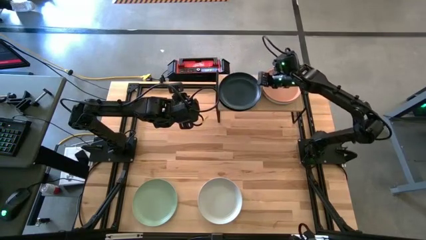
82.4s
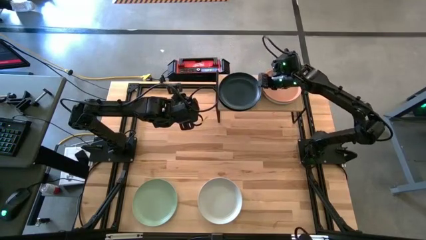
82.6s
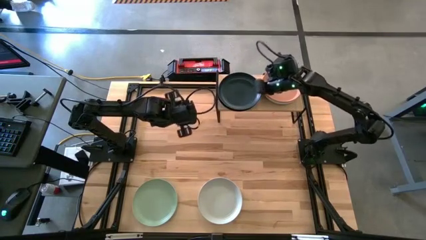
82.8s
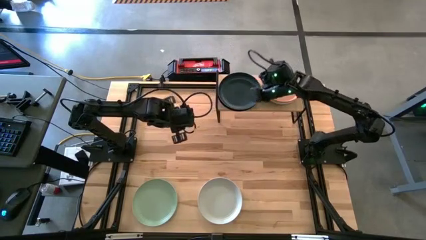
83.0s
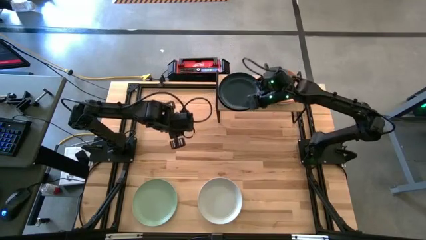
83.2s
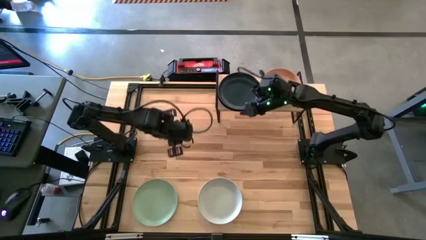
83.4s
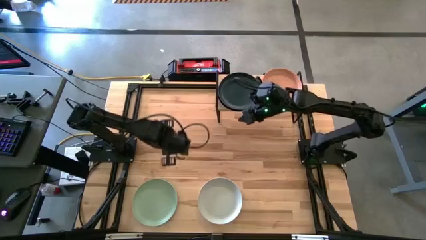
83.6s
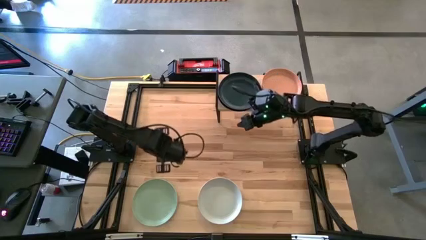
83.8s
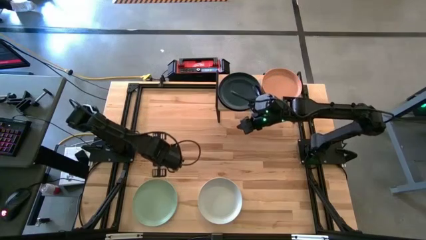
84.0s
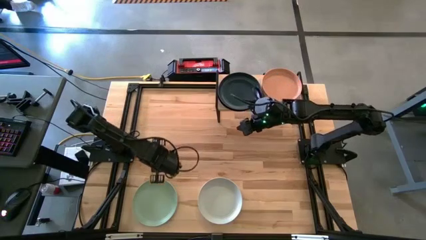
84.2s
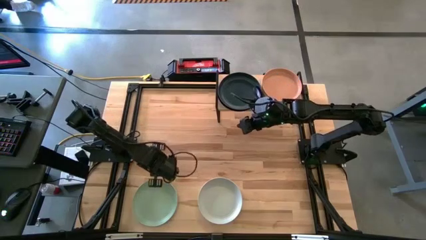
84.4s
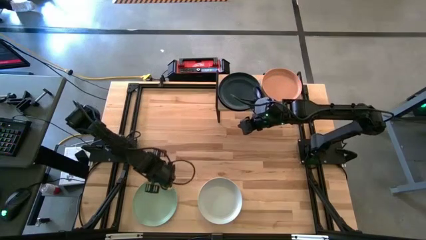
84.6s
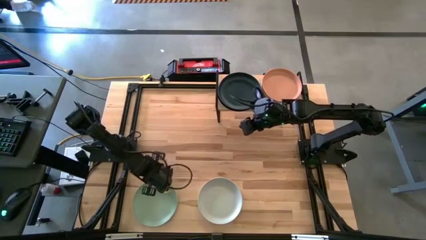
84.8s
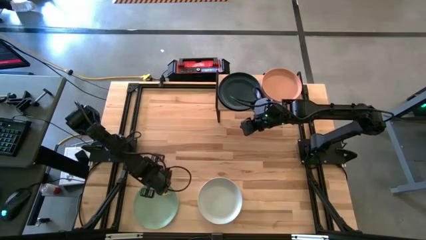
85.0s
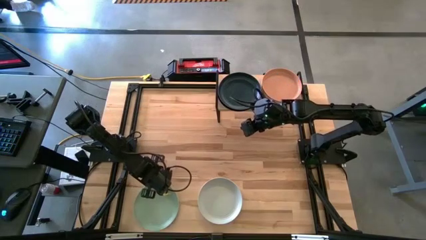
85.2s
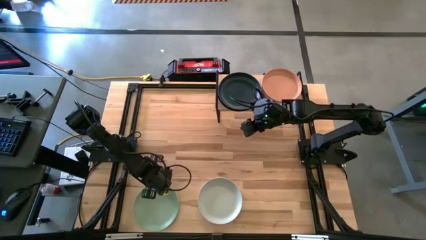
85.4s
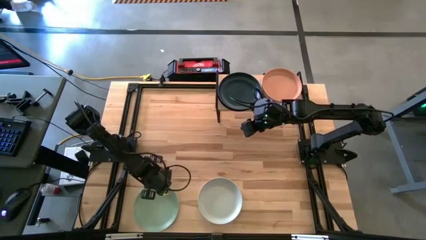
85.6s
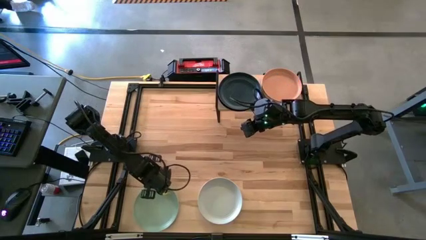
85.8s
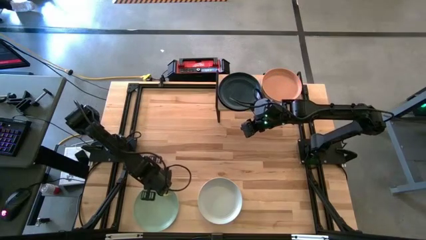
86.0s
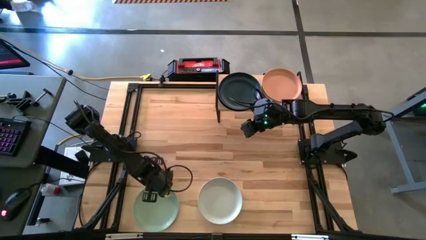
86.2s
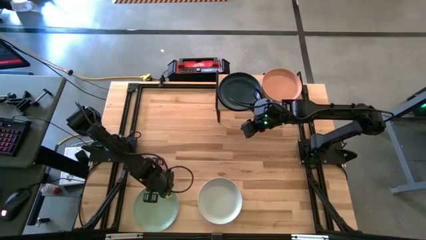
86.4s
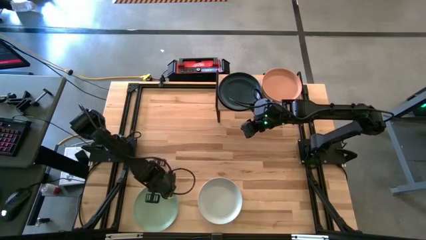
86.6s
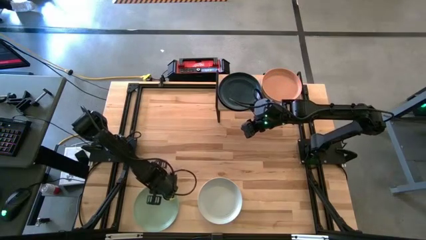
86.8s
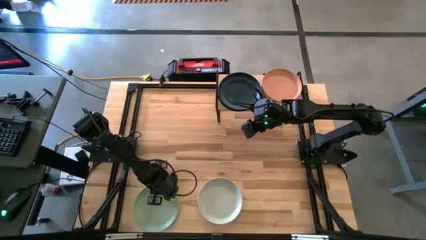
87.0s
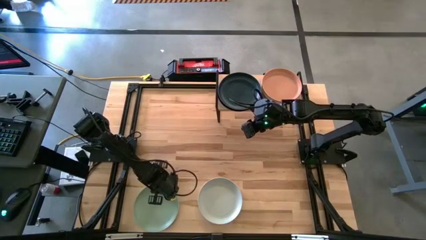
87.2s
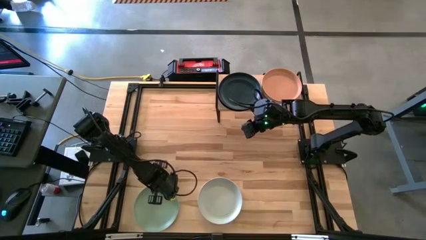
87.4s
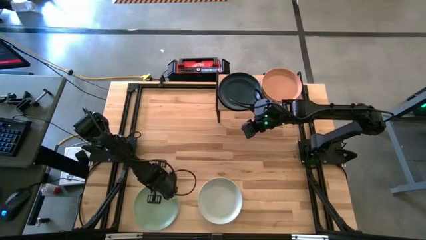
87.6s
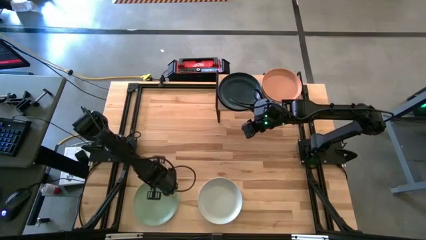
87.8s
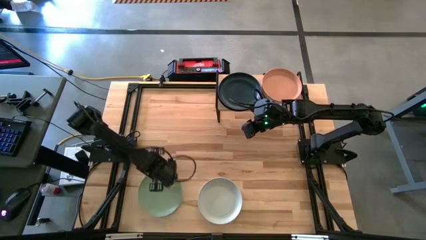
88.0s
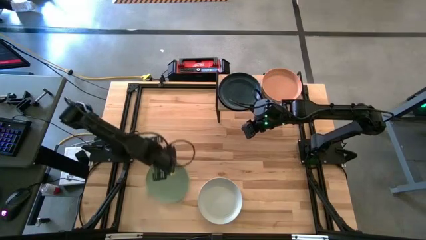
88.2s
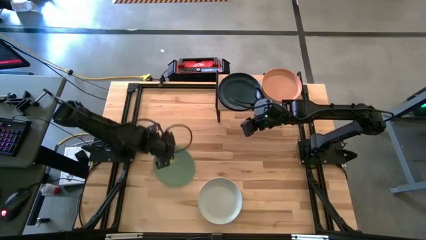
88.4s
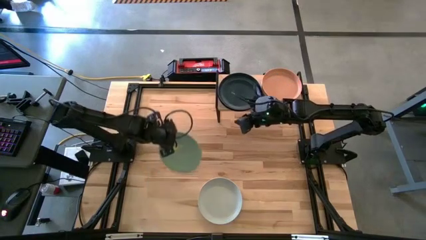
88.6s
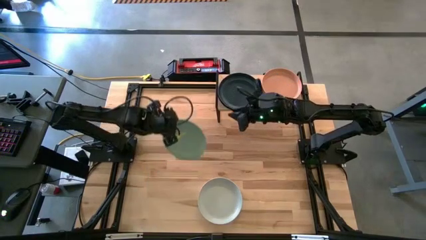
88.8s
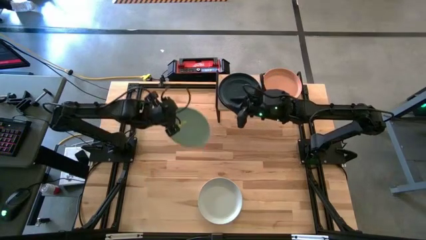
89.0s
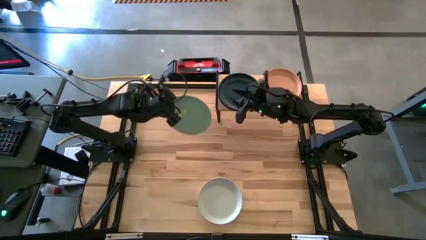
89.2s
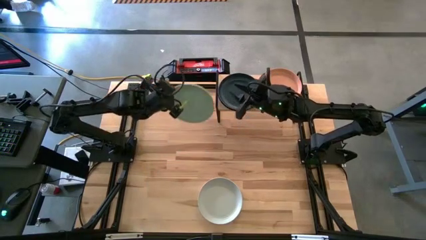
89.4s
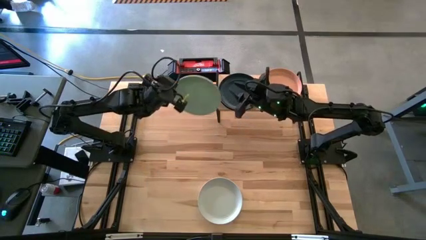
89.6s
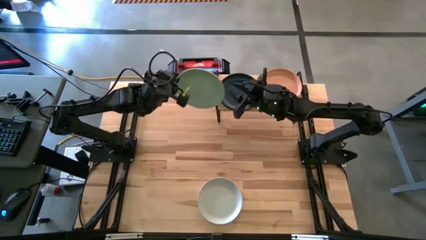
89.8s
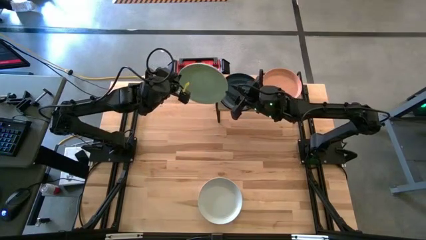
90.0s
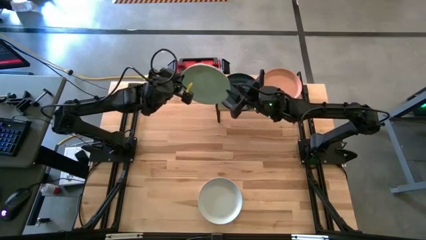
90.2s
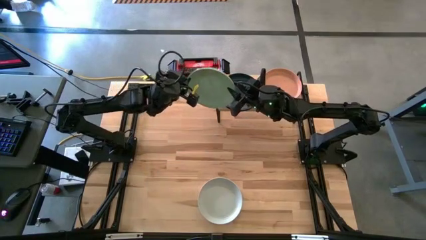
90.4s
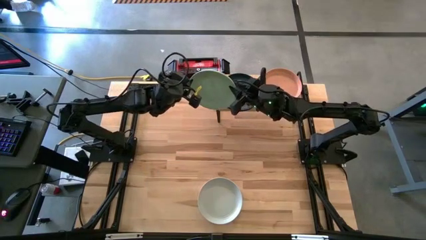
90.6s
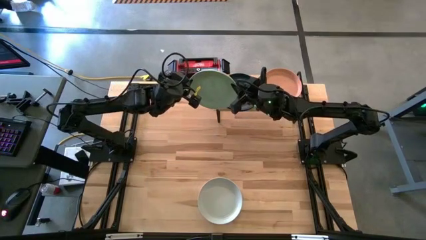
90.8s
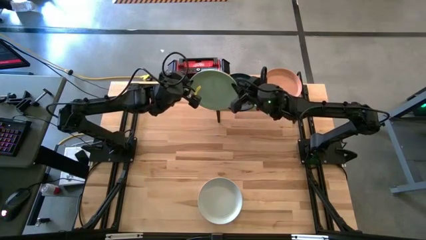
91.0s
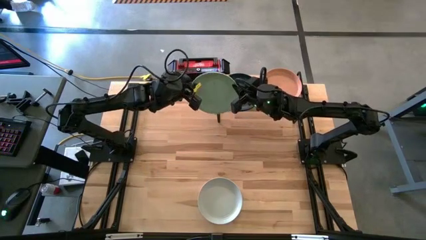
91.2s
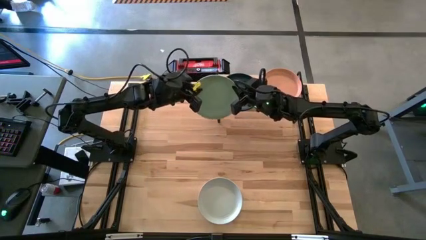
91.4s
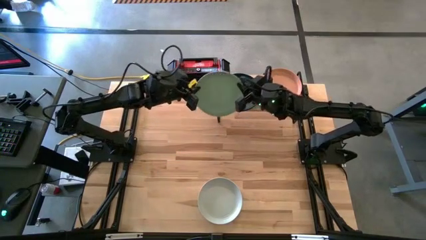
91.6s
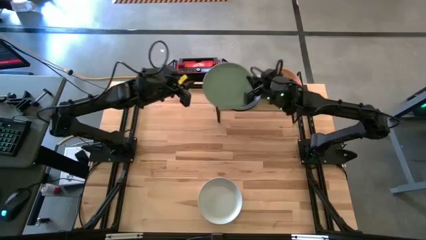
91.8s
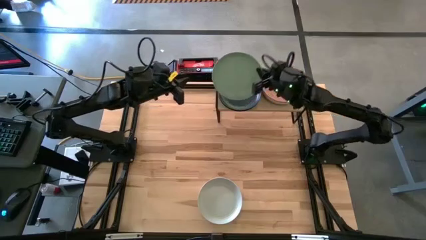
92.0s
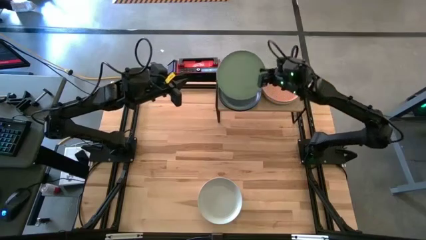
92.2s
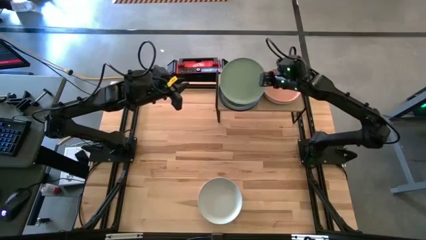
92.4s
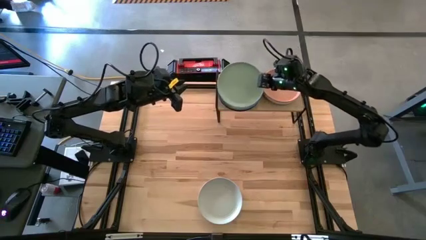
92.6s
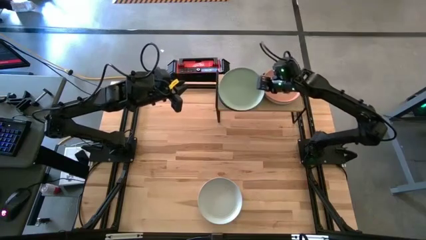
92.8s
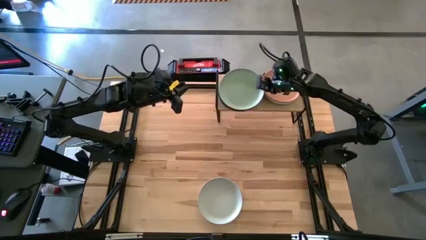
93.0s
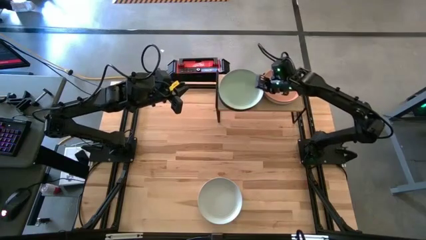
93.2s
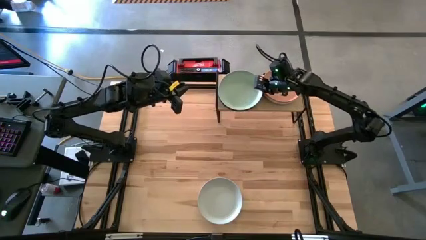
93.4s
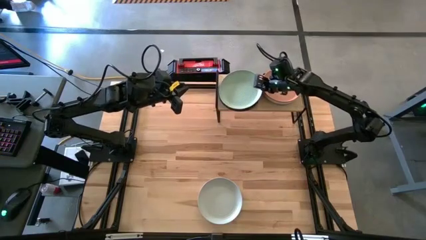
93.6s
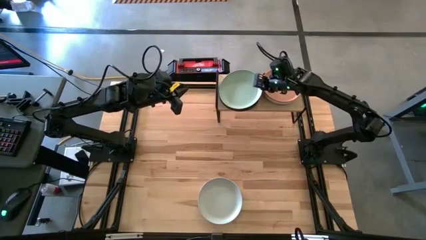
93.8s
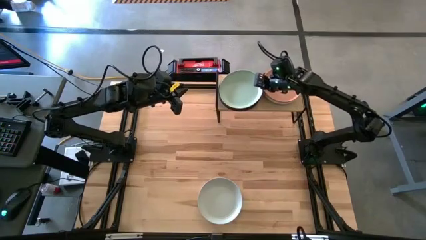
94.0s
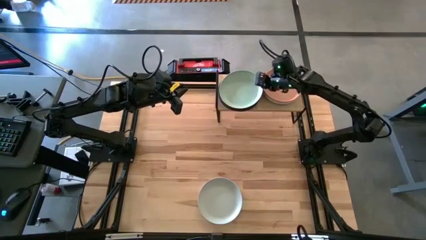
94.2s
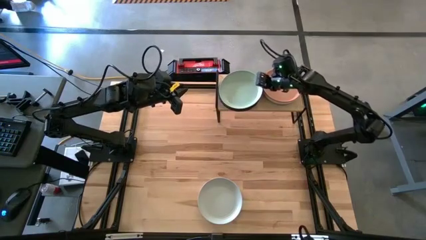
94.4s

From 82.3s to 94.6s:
Task: Place and stack plates onto a shelf
Stack the light green plate on top of the black plate on the shelf

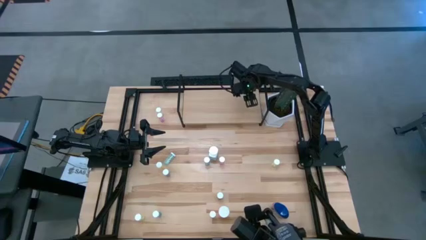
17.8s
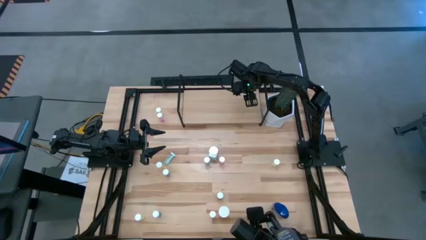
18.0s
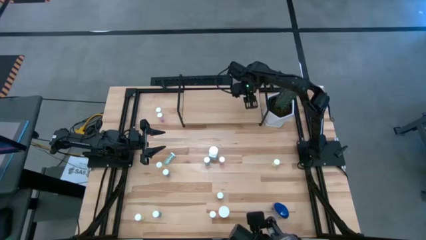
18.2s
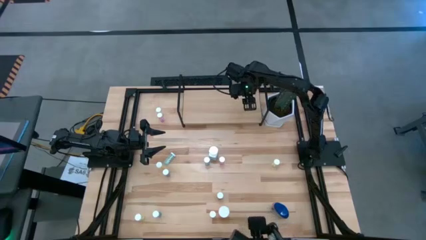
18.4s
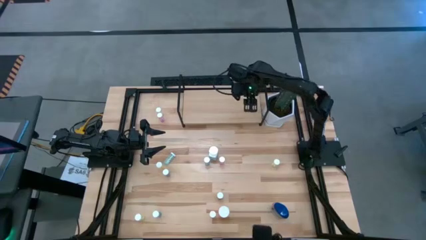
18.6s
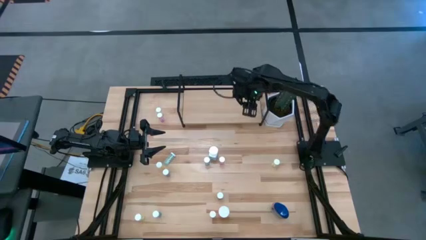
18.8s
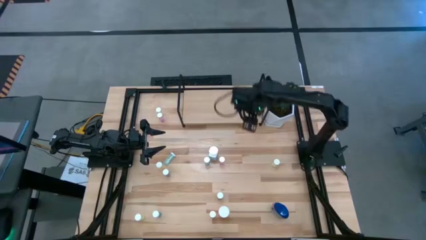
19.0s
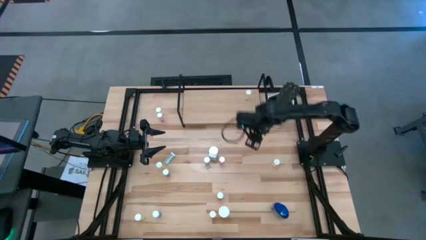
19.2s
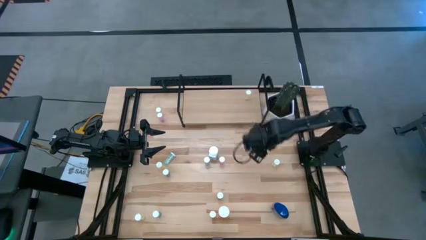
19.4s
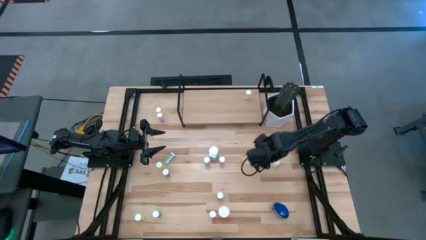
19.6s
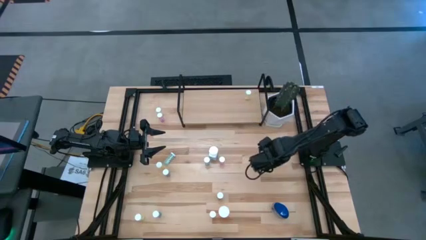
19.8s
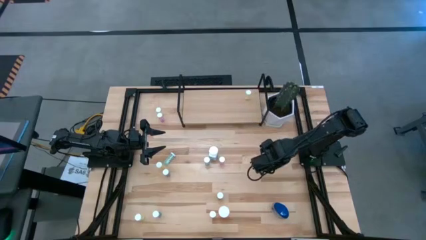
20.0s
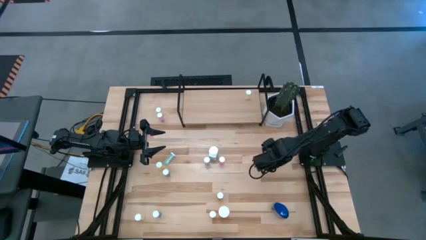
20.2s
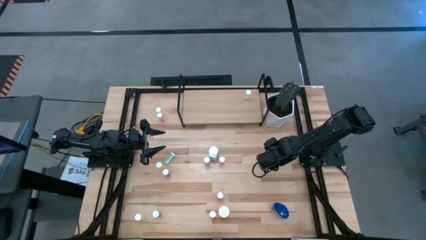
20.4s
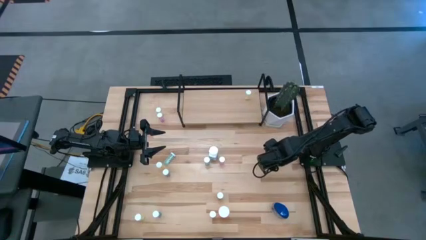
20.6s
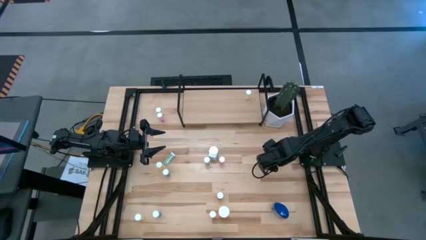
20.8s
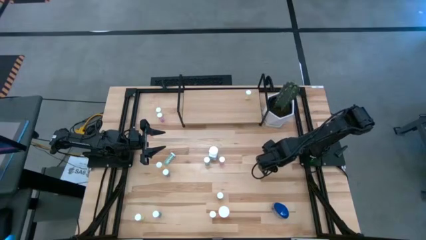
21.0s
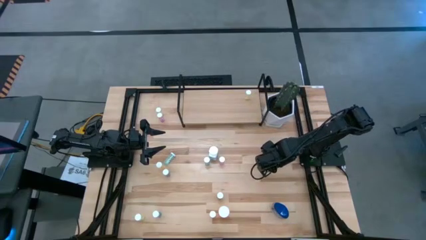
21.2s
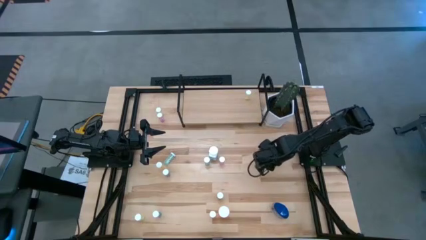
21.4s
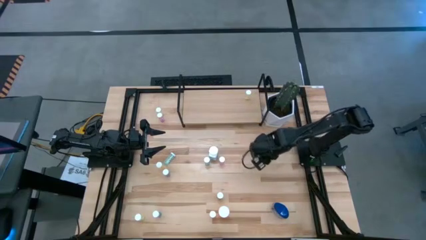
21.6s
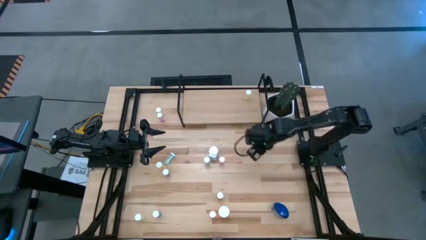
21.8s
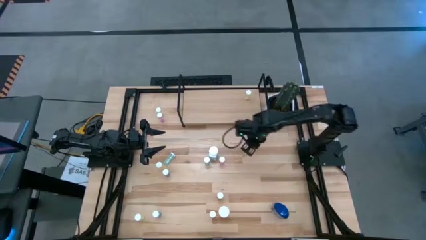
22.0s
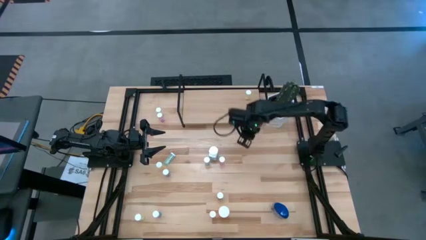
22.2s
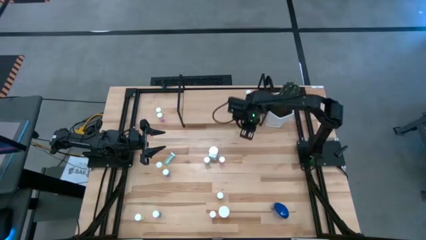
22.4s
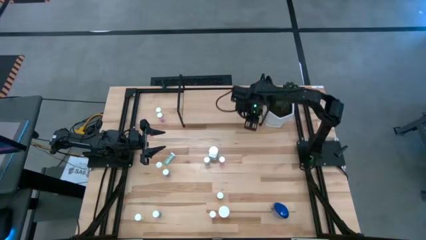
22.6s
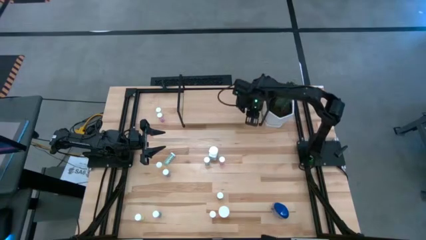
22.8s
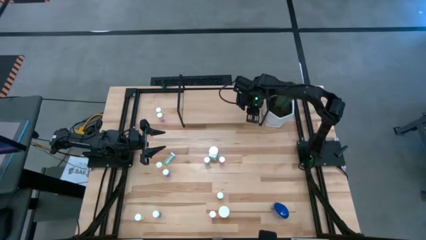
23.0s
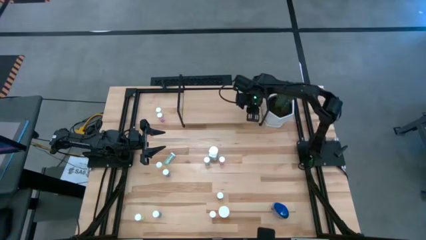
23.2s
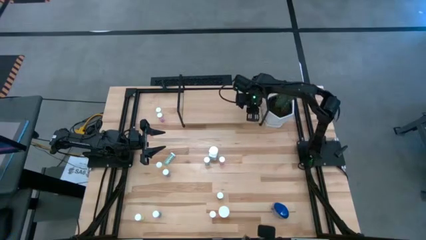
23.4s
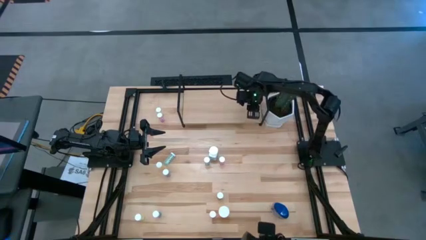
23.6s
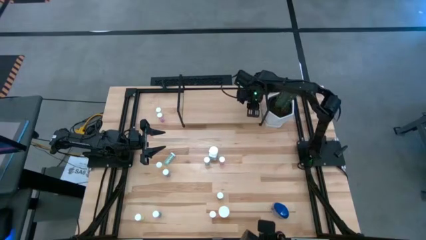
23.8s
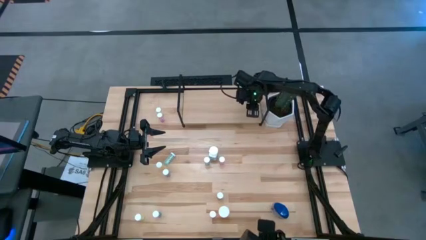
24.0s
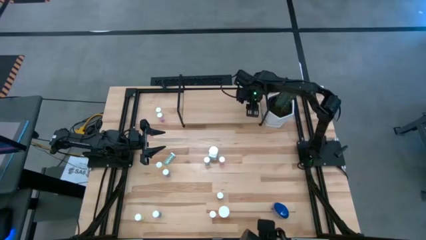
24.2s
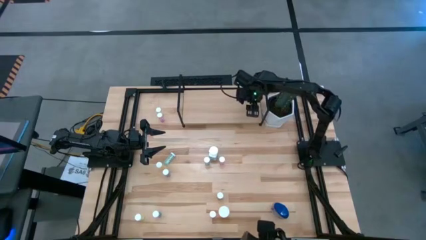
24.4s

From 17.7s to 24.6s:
Task: Pick and place medicine bottles onto shelf by color
Put the yellow pill bottle on the shelf
